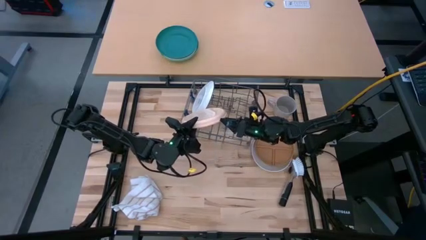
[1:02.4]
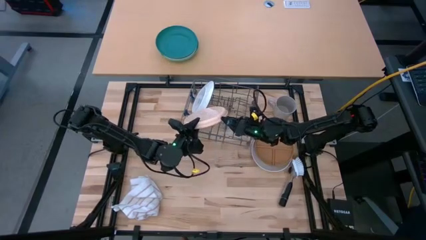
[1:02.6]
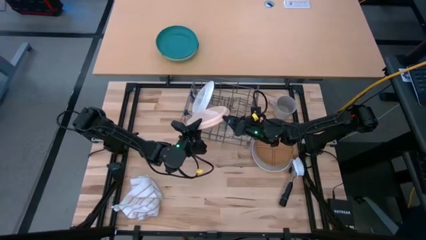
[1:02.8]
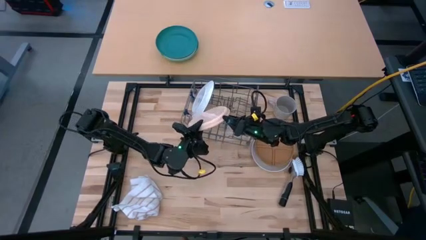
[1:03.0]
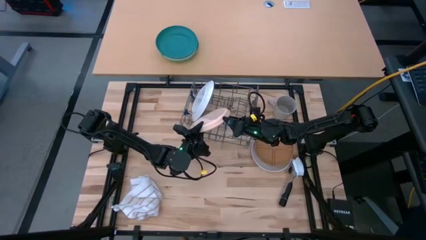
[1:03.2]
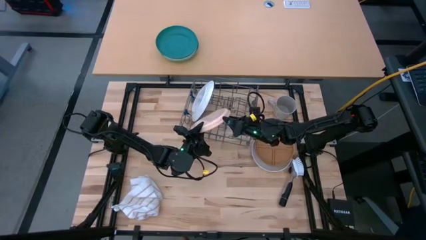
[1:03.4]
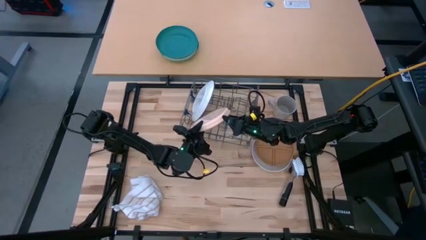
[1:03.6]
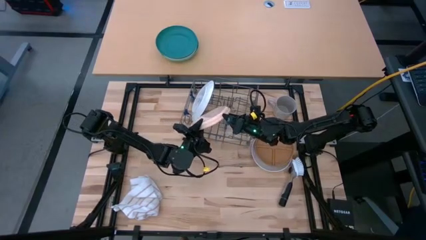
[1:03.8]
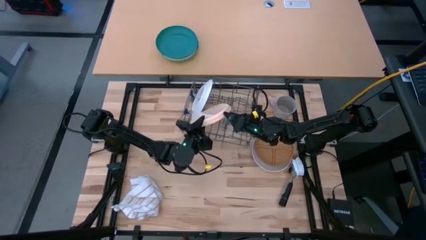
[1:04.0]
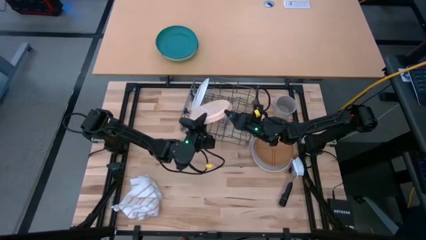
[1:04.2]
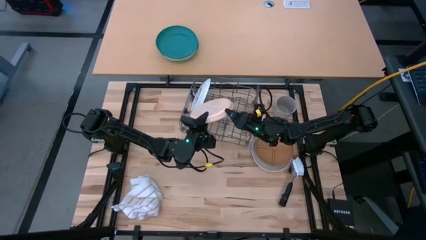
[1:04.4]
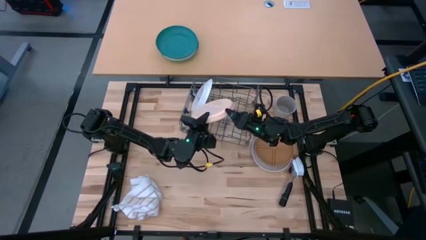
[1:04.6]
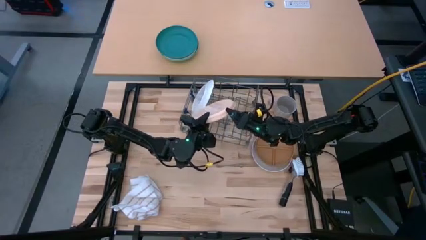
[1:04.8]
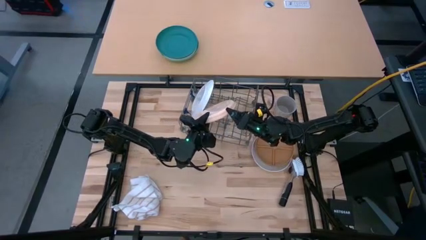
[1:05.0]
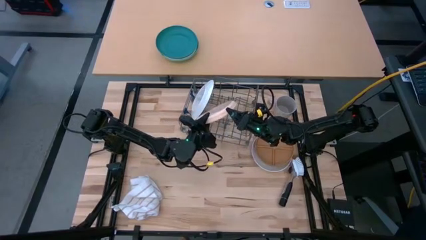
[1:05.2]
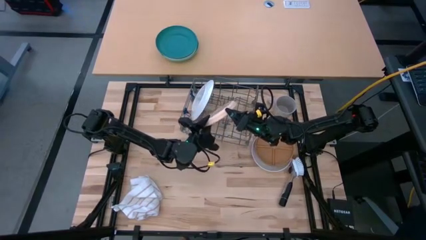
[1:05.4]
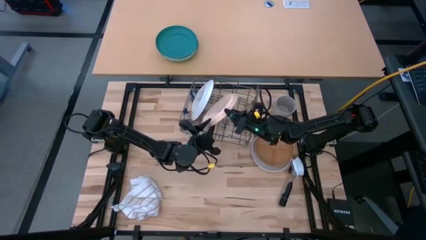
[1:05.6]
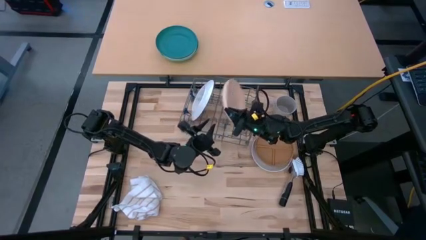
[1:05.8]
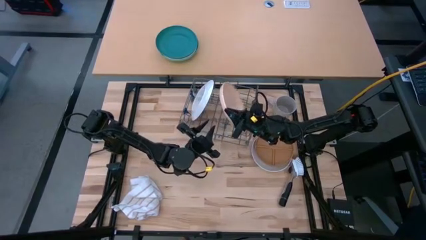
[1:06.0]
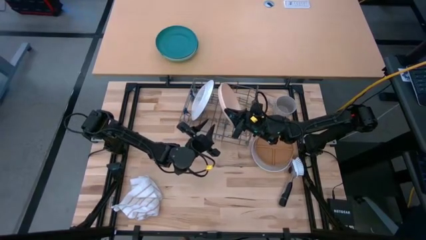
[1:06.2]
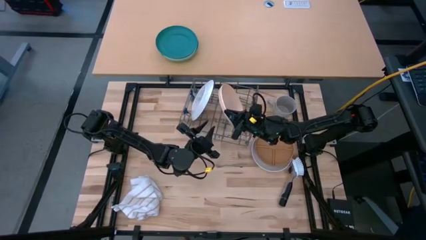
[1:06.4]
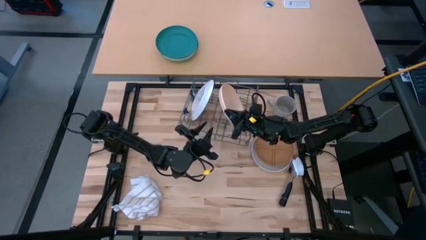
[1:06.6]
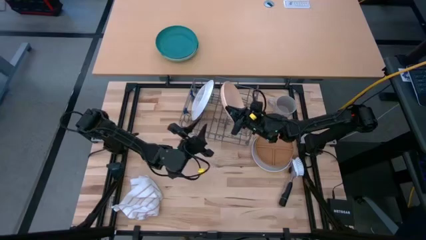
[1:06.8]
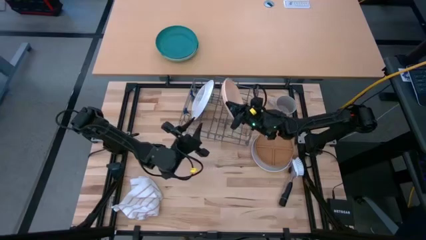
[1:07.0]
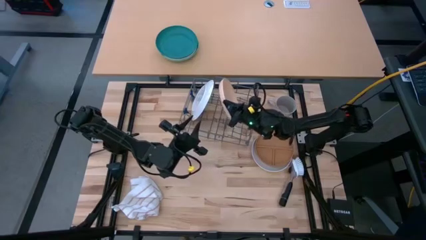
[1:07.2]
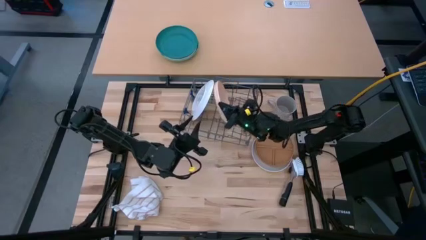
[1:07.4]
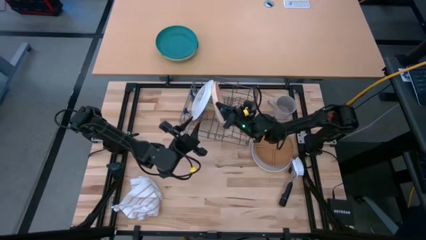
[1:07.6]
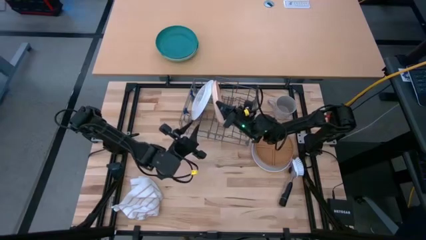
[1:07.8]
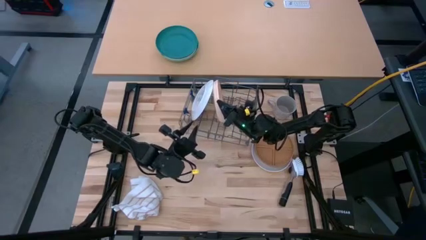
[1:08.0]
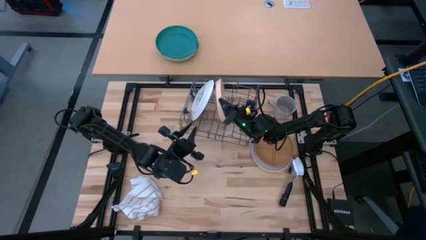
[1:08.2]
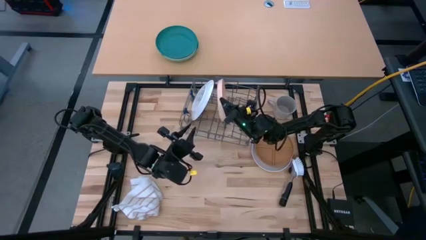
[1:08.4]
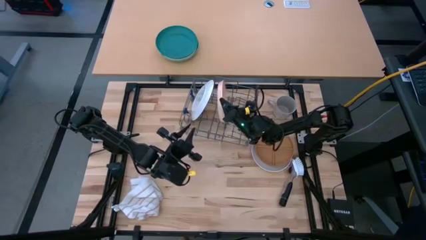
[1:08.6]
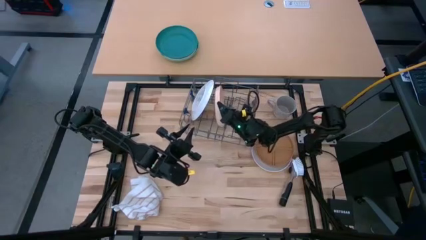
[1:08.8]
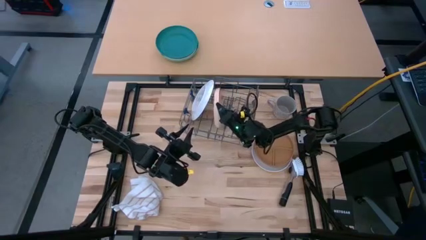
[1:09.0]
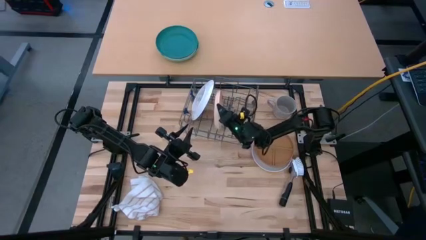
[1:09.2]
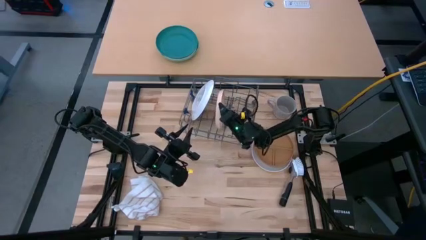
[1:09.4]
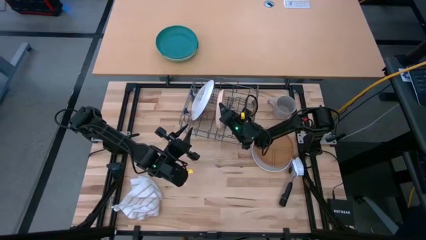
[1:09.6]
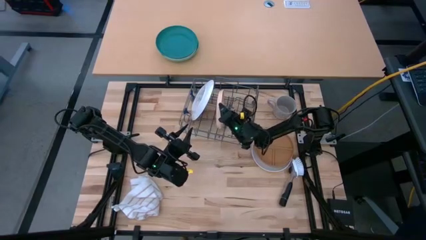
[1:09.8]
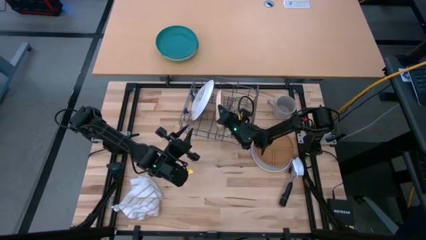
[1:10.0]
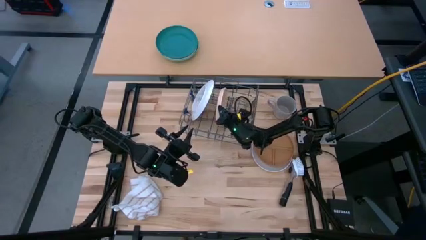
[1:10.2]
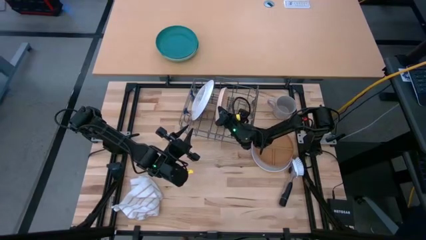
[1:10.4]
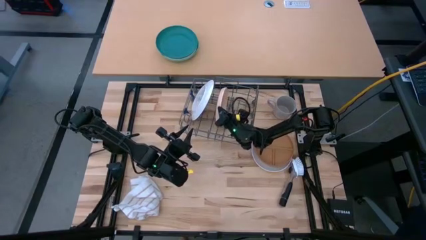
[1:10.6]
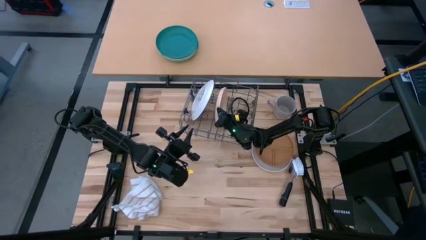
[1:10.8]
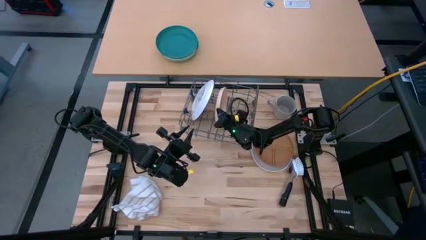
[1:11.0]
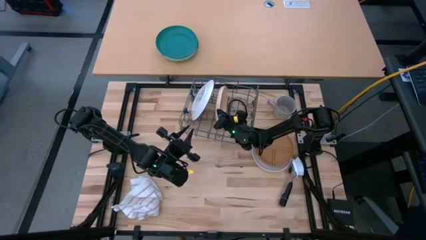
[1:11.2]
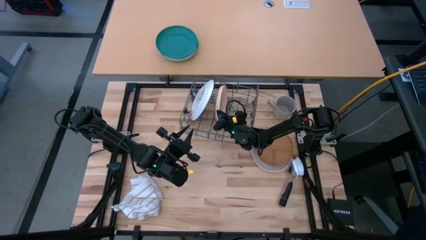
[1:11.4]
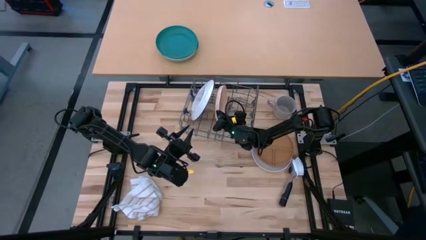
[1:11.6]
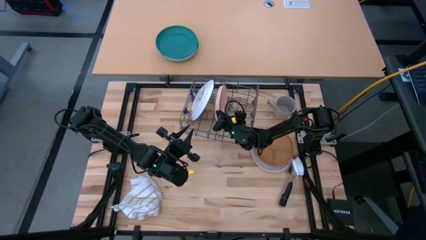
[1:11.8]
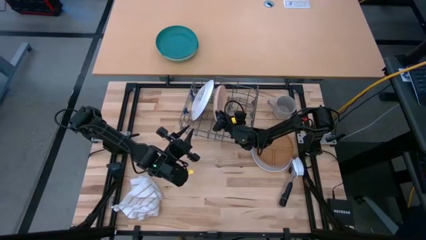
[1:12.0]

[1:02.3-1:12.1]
Task: Sort dishes
Put the light orange plate in the dish rack

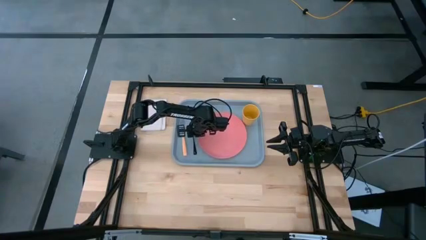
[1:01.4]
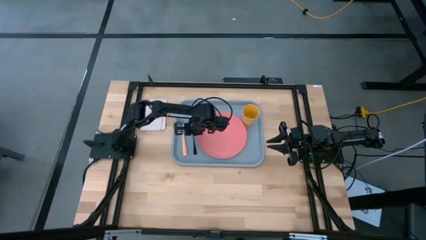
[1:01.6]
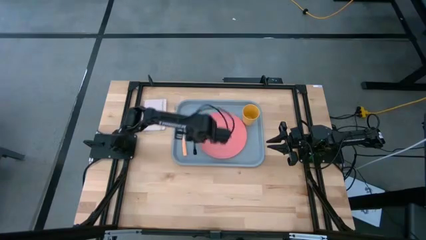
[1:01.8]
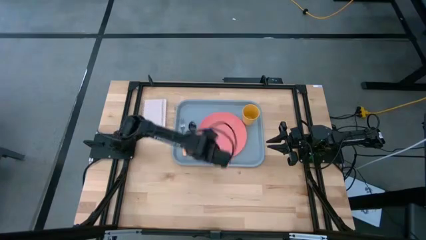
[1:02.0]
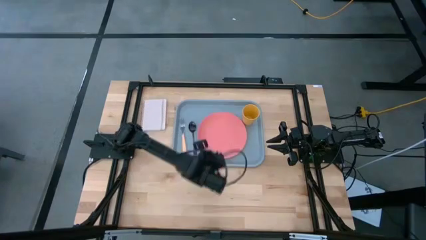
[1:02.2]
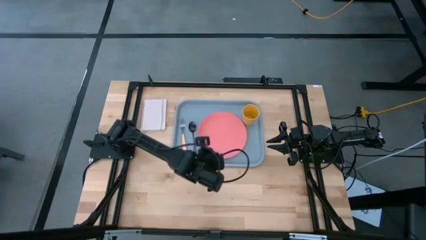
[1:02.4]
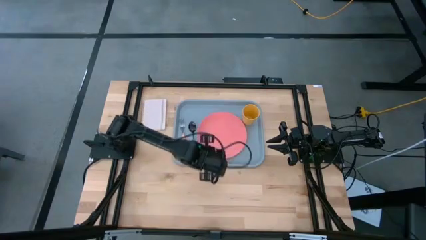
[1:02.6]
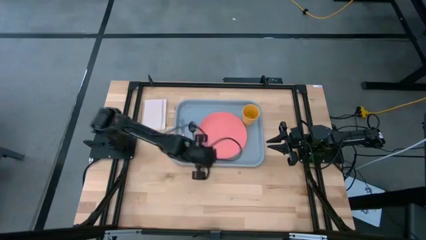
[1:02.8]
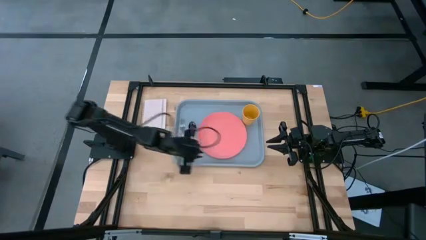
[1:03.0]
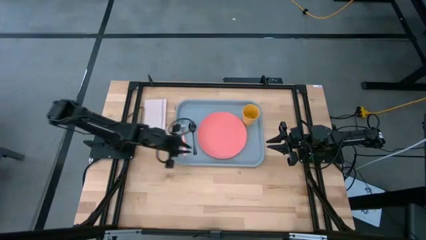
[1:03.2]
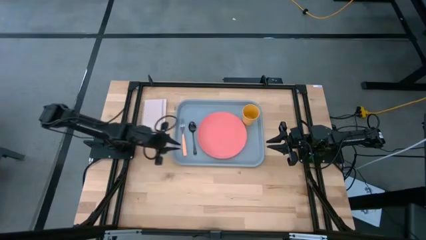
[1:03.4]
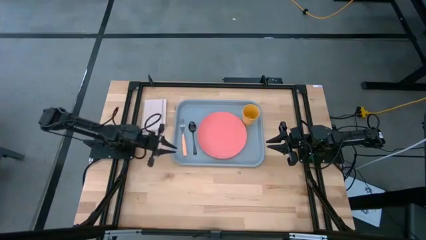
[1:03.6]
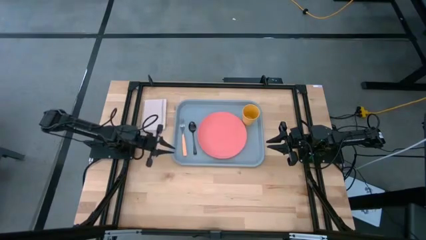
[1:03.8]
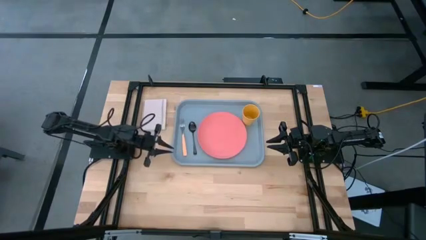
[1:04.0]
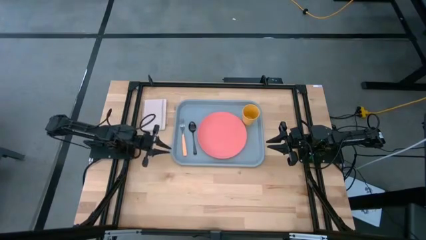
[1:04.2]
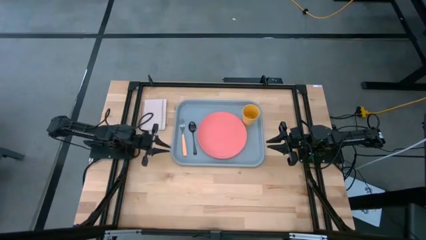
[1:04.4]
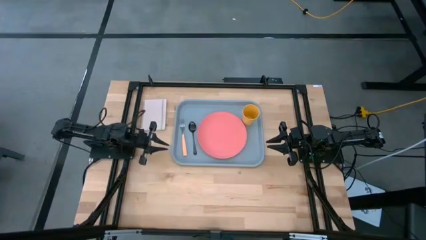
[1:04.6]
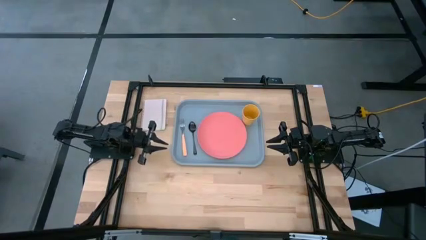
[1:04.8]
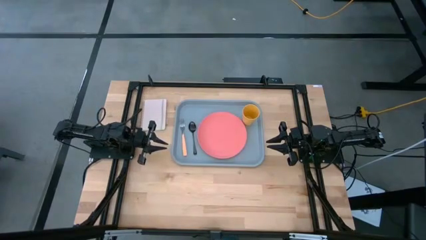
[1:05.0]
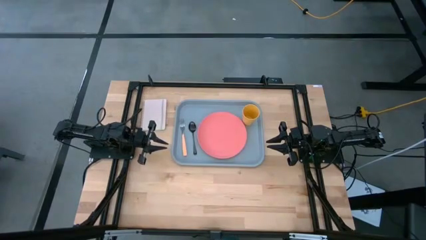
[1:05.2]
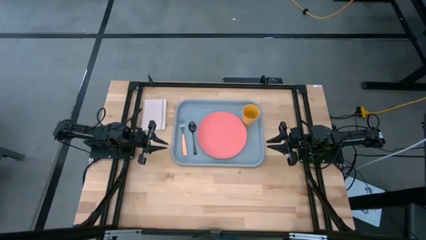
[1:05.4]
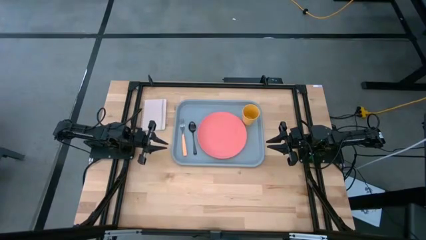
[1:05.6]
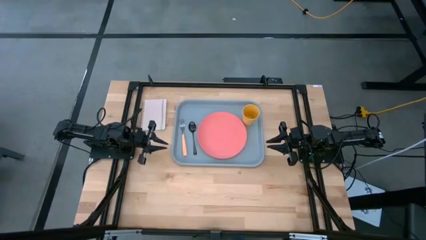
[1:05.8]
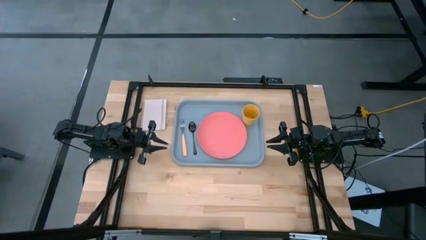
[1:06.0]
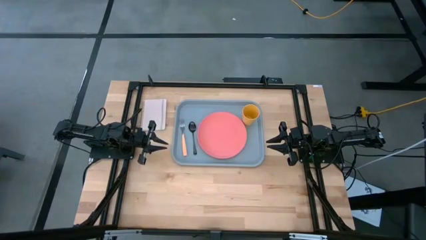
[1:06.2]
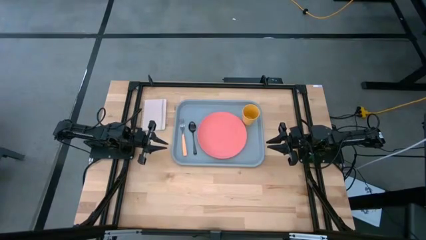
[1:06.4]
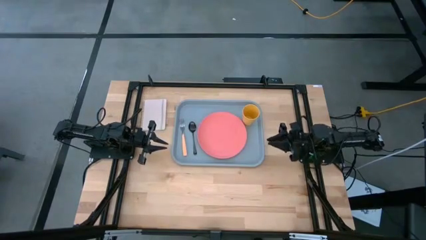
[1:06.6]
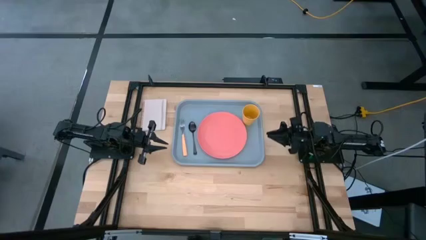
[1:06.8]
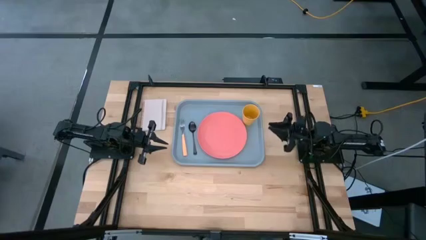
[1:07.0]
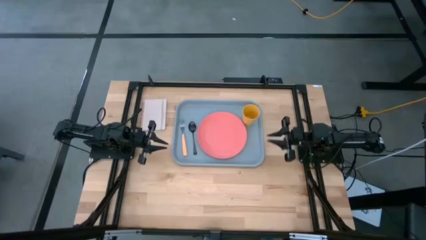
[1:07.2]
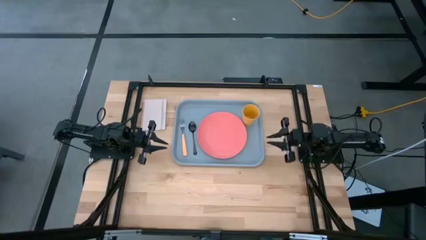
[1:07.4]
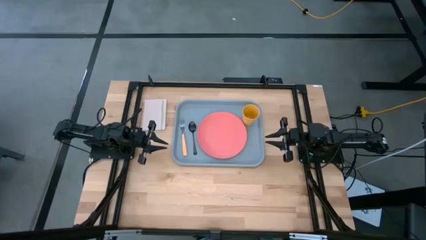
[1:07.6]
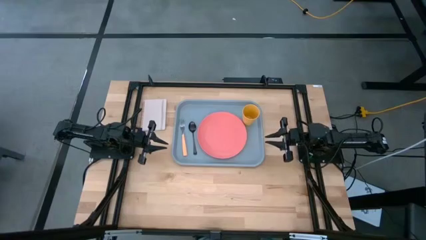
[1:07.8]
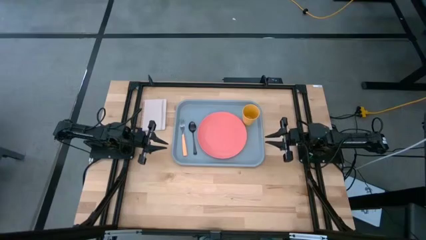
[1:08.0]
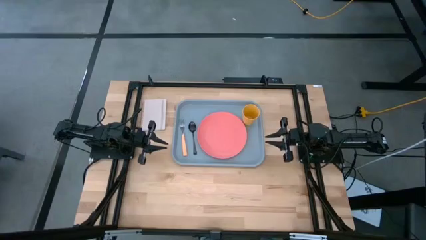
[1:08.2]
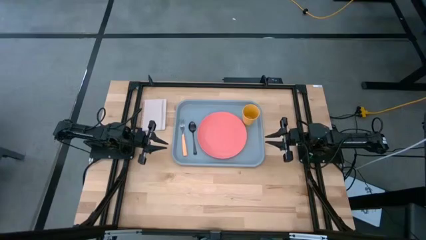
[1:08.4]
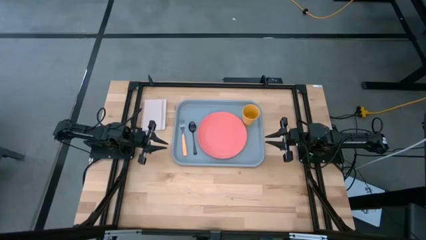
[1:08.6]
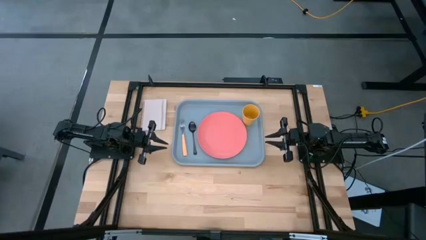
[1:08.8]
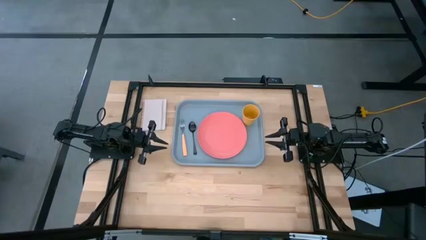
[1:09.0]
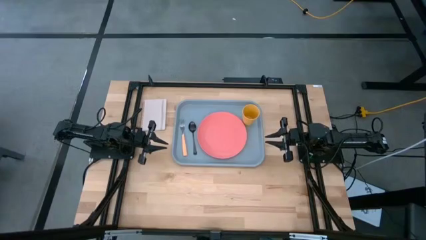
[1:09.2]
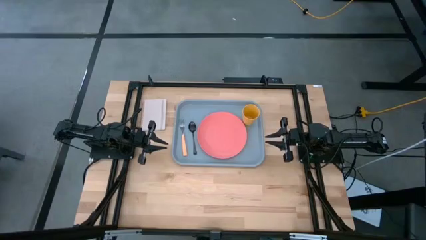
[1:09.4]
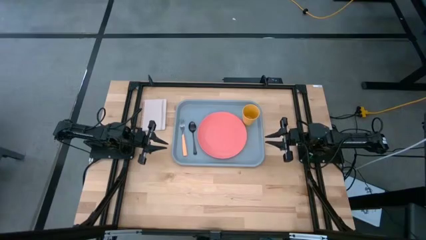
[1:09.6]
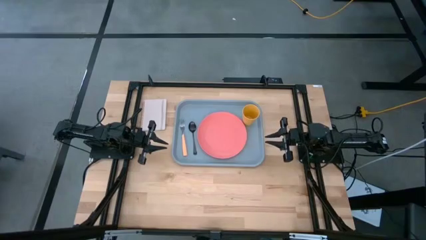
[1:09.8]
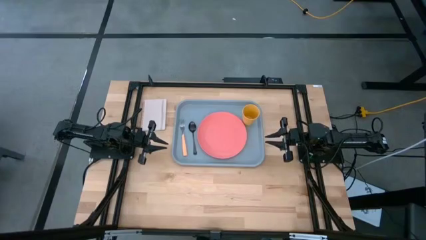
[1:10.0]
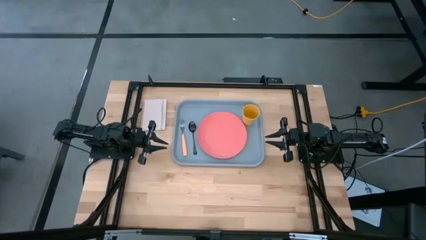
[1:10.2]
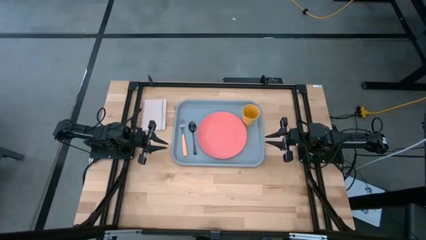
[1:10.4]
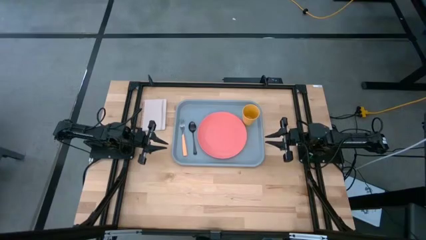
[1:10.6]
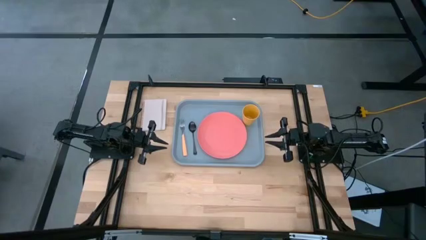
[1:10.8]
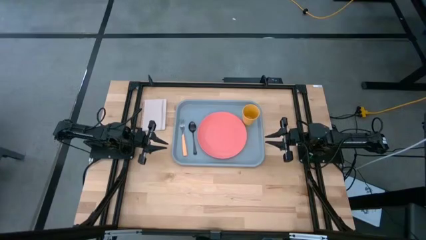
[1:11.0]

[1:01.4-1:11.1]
Task: Pick and place plate/cup/fork/spoon on tray
Return to Home Position
